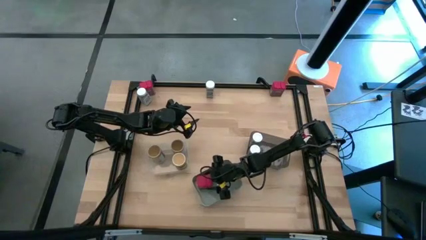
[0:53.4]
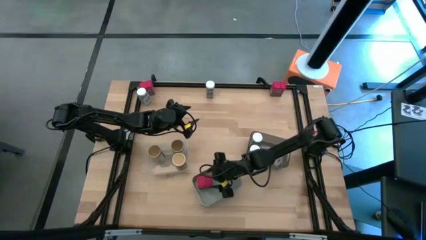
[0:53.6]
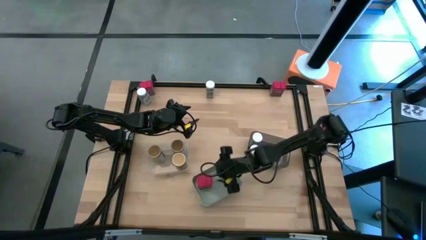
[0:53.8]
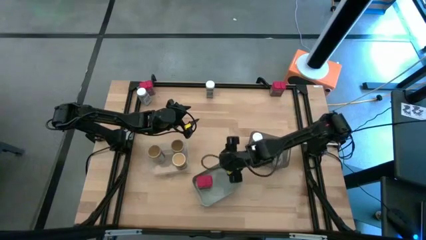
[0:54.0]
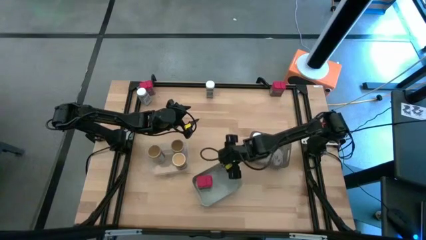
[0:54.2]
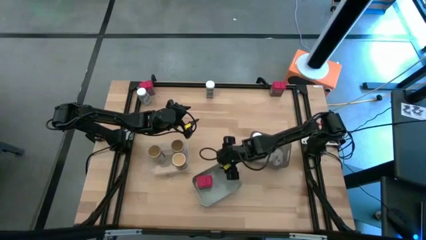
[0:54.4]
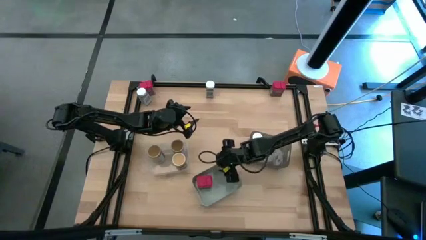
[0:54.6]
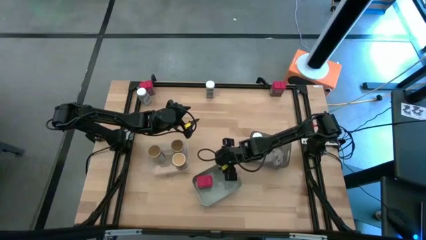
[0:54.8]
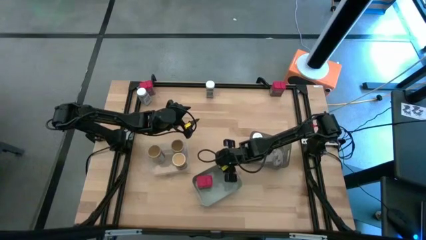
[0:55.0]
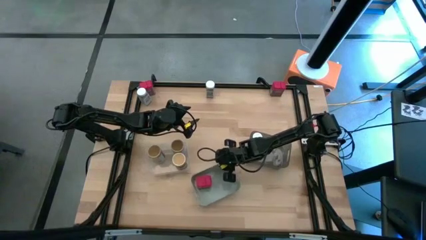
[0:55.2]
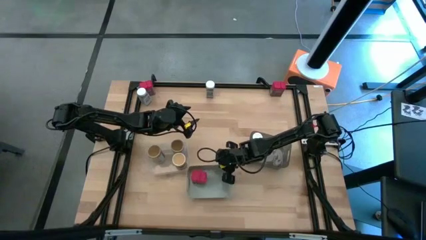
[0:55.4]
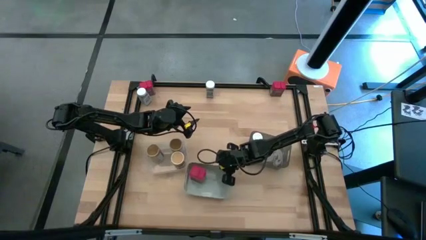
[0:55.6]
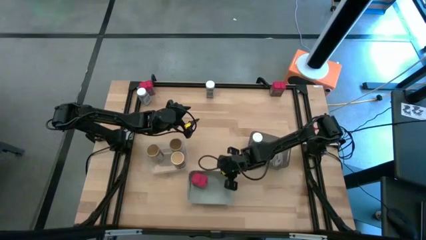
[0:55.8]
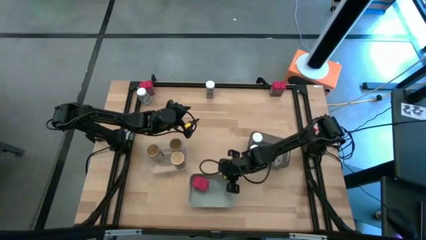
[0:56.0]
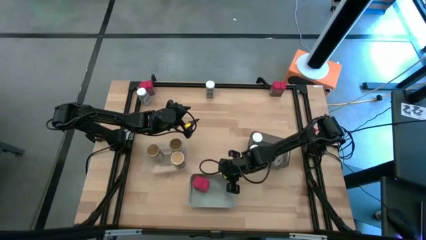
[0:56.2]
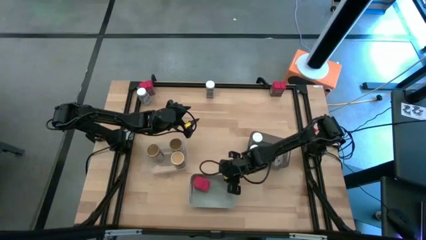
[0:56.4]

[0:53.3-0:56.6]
Task: Sort spices by type
Adjust the gray bin

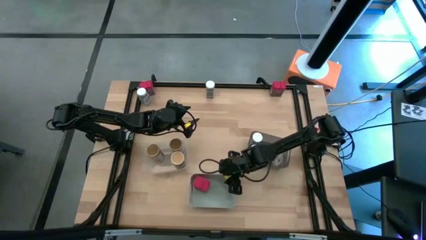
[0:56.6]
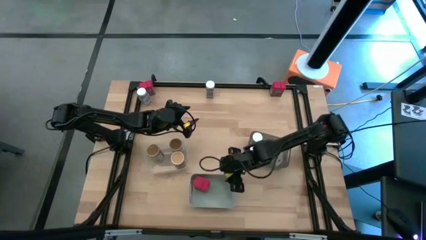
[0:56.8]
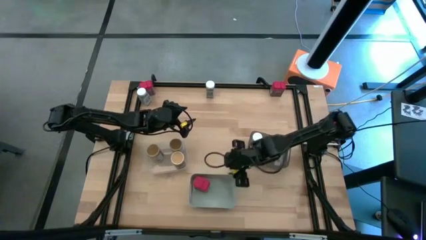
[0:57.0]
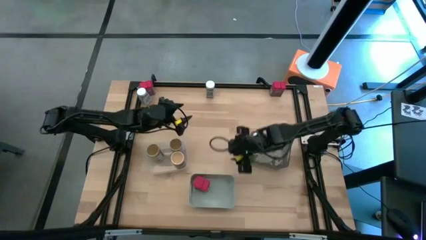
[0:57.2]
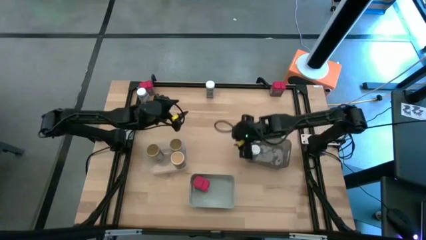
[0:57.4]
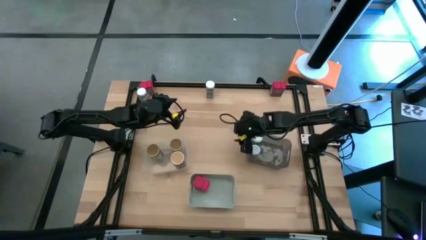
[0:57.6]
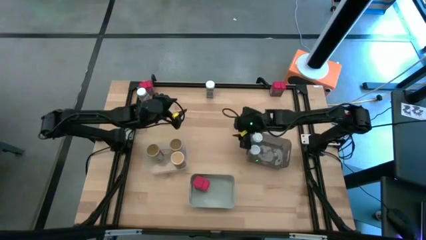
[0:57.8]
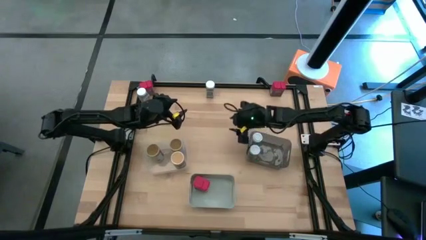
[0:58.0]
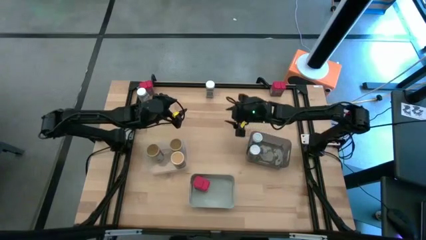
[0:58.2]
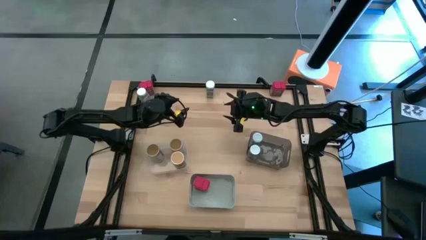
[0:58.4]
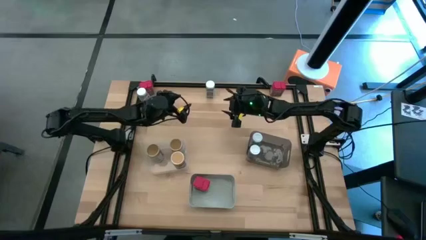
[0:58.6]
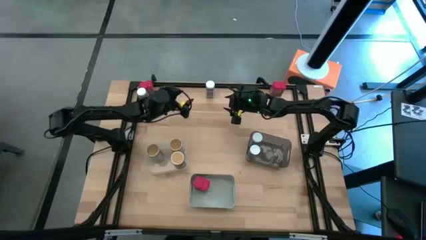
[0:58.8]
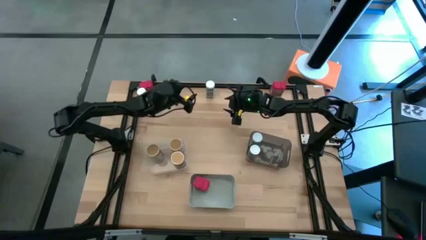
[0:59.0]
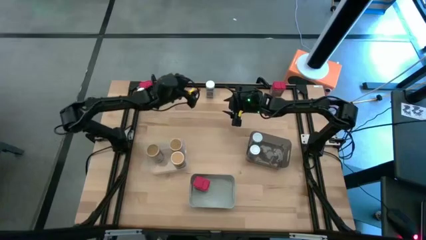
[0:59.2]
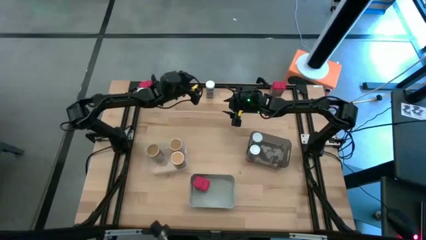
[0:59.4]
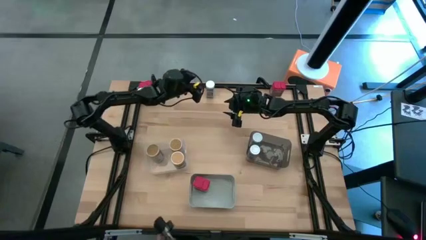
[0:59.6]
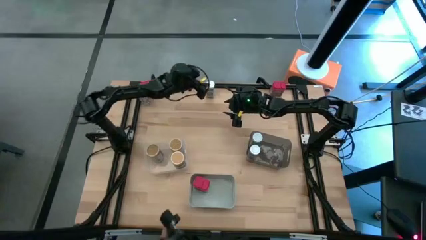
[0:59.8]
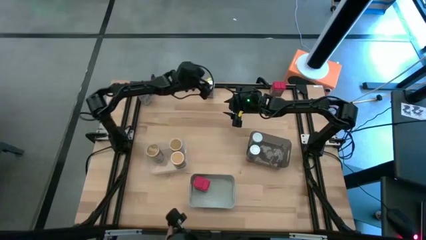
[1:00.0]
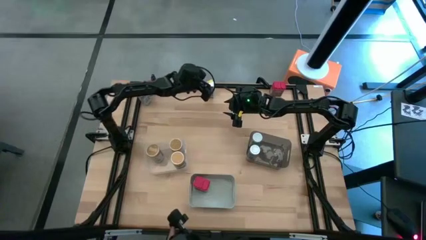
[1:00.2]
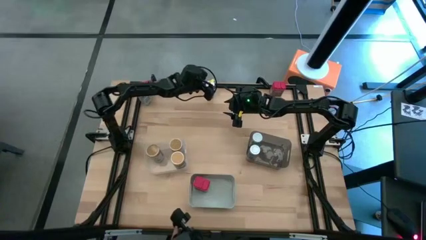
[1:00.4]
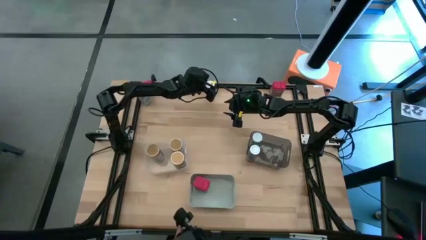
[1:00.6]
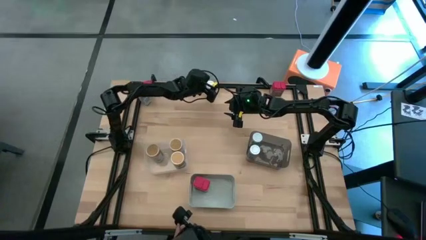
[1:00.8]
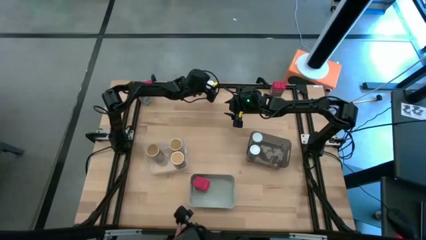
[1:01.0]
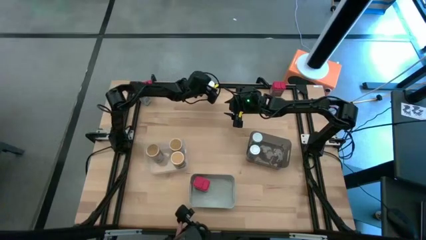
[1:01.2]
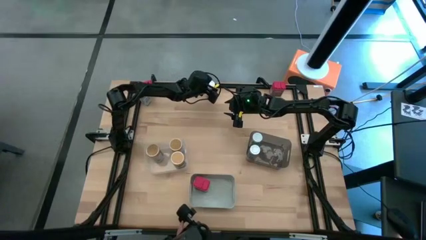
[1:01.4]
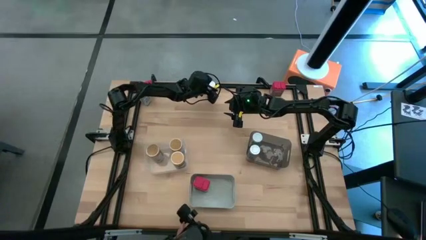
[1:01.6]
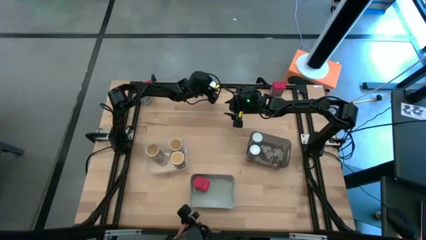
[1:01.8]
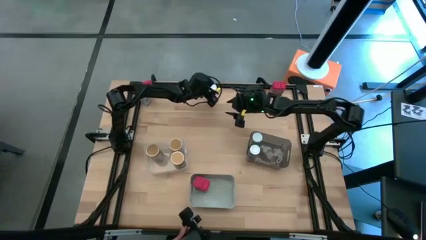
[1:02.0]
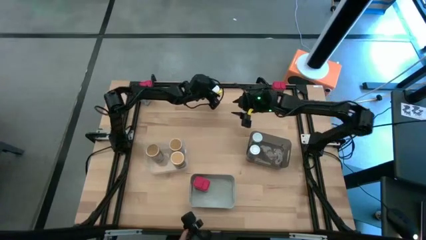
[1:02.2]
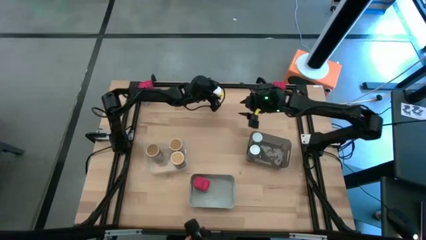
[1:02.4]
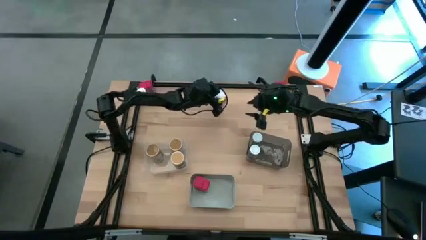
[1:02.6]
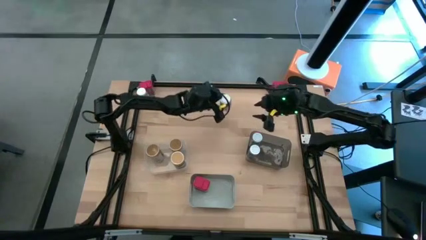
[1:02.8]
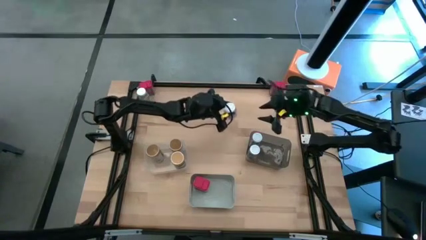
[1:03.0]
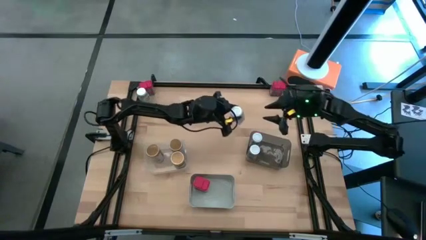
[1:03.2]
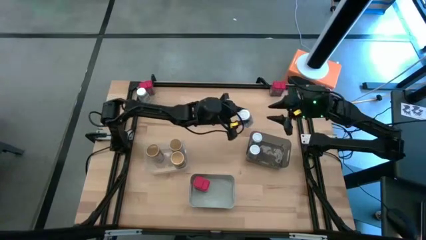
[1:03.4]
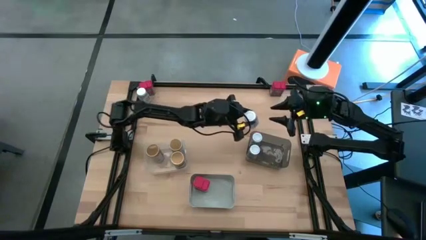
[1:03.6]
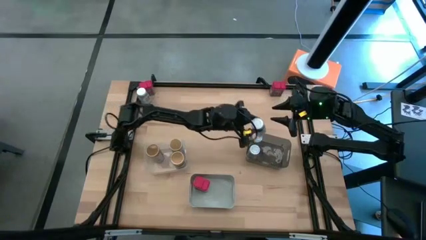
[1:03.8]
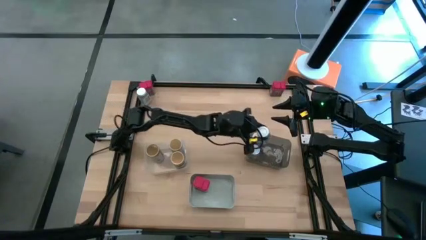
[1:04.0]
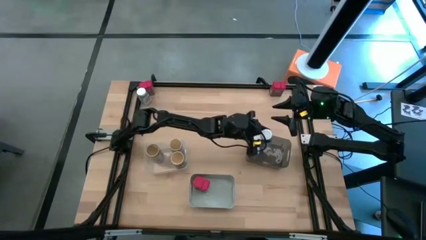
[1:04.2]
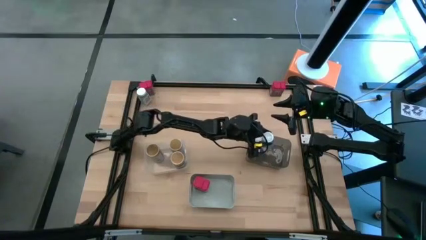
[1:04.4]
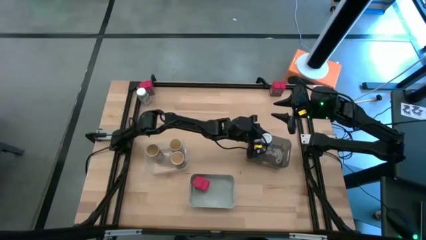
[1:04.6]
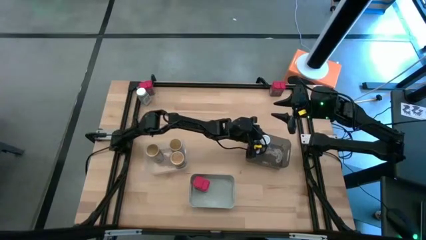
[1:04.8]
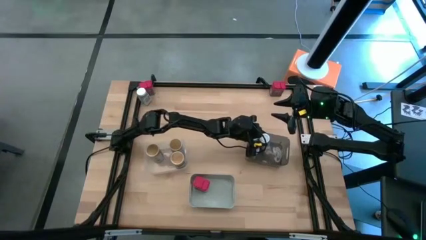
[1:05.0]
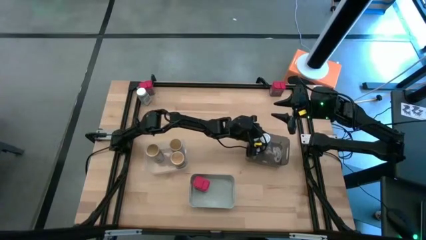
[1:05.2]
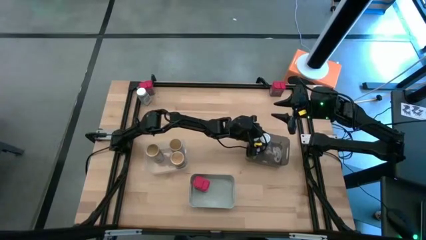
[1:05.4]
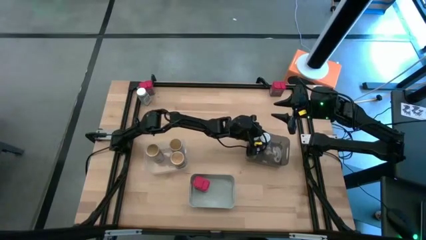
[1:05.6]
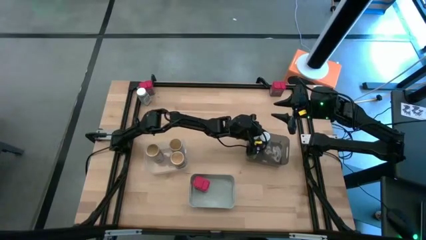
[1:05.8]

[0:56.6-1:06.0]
Put the white seasoning bottle into the black bin

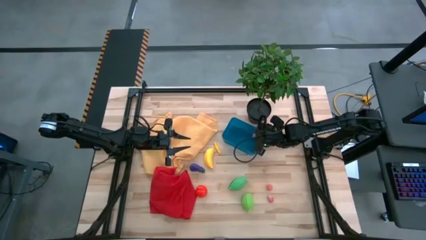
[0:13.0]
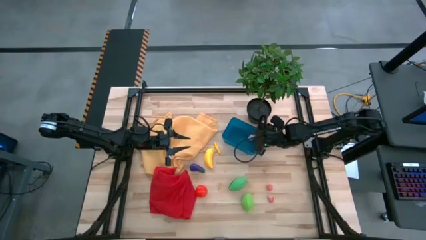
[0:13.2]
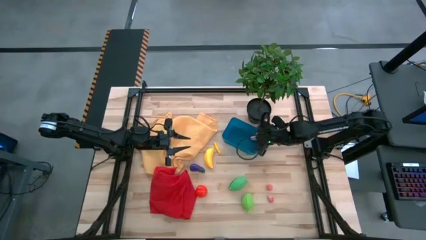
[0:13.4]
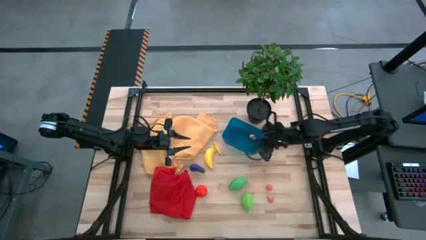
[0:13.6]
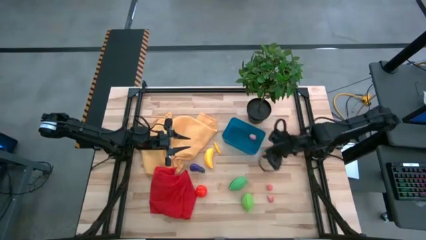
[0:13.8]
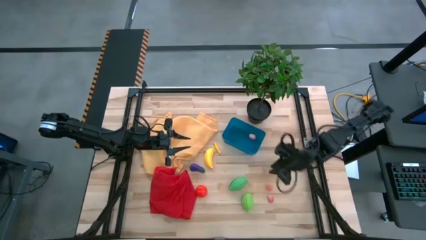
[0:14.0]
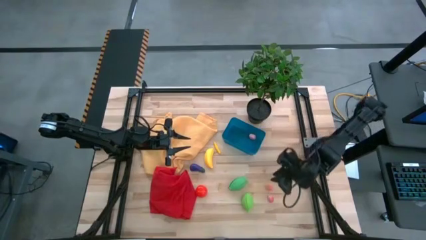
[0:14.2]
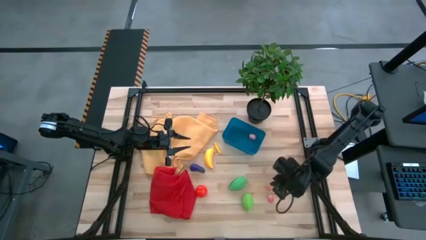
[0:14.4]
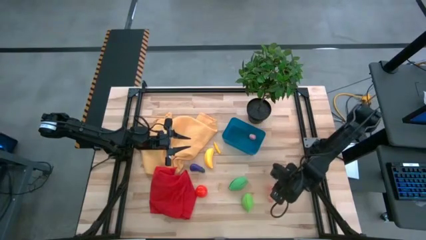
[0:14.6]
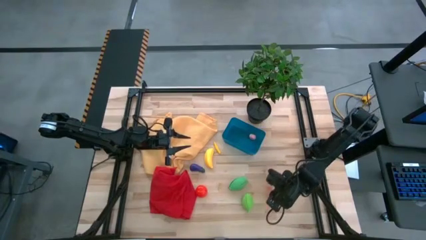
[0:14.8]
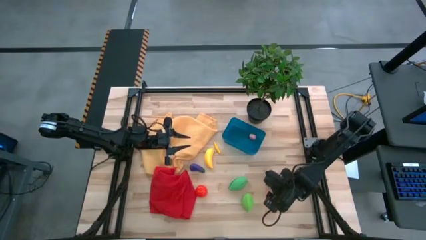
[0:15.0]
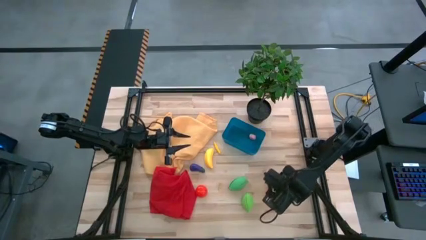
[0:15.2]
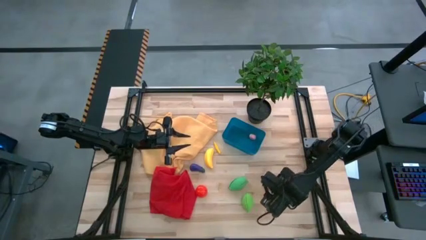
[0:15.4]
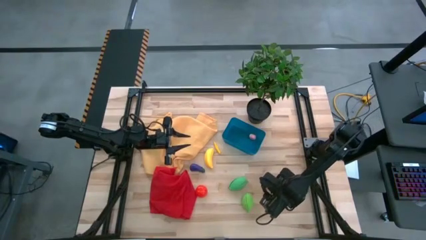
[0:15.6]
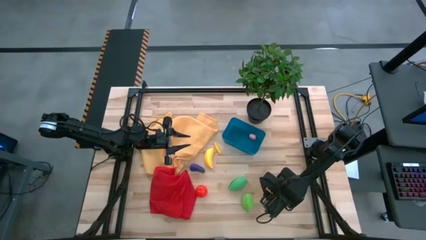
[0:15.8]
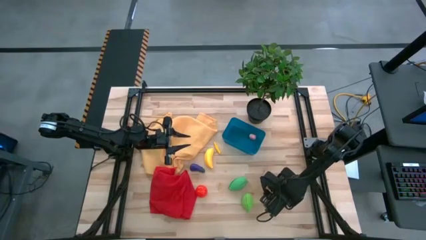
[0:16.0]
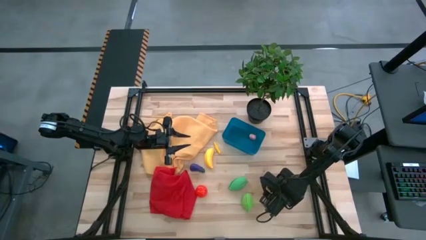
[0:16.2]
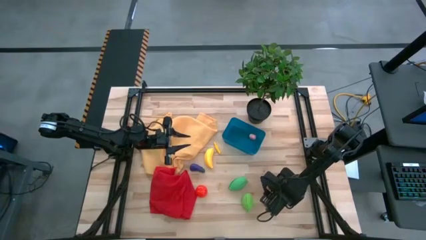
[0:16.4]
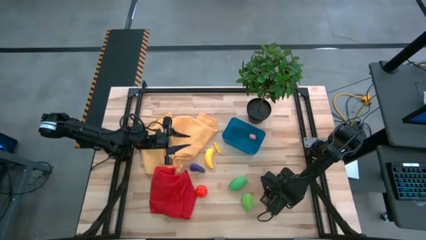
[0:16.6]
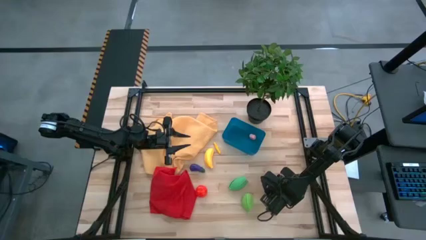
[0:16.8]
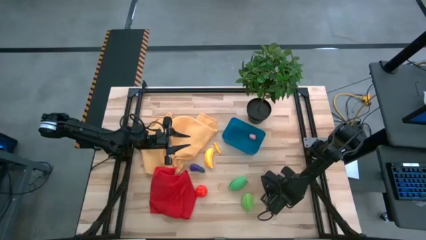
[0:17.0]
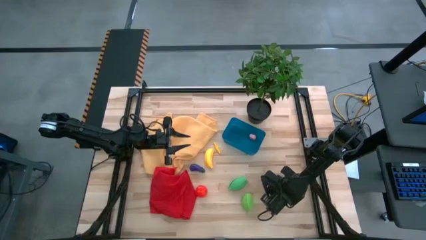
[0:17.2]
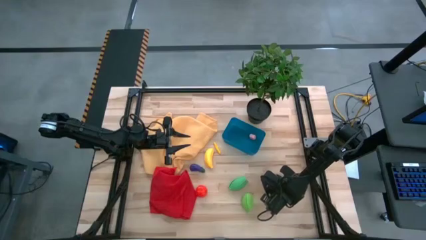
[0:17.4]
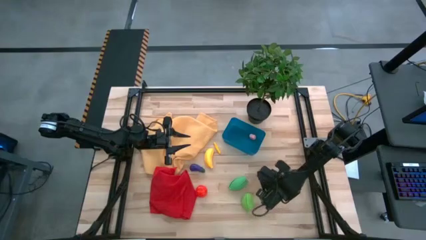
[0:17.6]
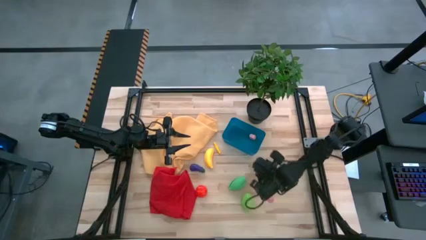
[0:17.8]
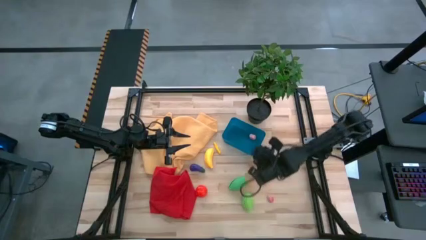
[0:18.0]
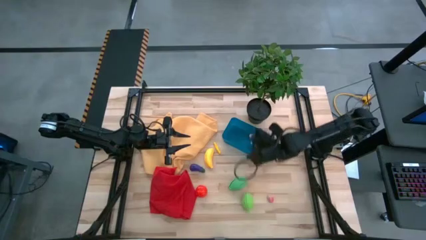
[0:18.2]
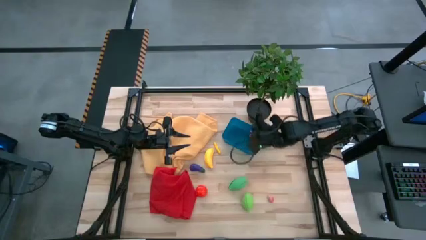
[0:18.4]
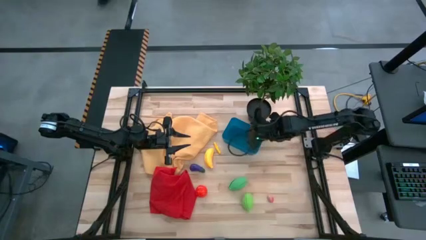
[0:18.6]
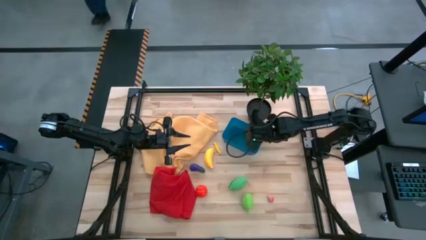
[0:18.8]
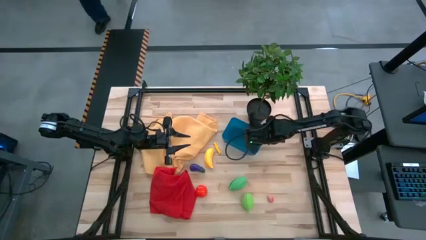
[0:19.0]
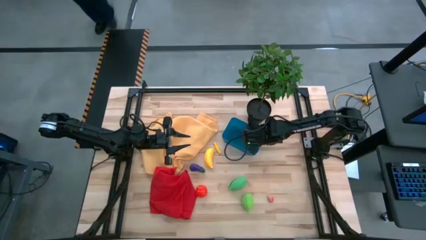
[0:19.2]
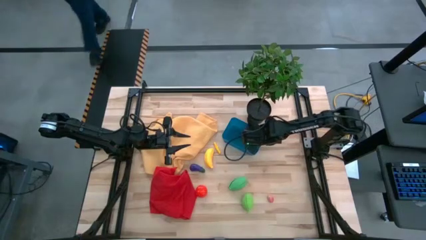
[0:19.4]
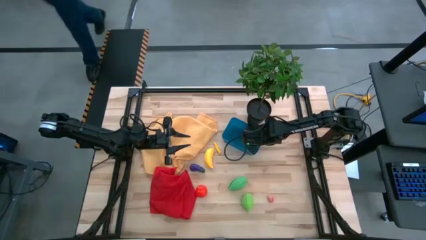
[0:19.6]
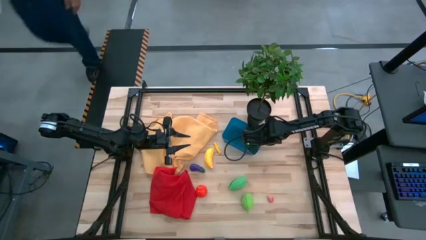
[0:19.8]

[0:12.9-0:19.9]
Task: Pick and placing Produce into tupperware
Put the top pink peach into the blue bin
